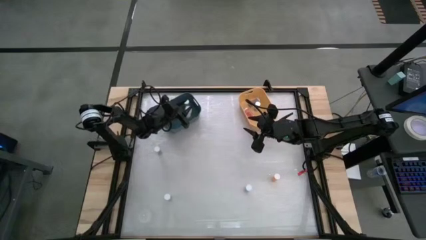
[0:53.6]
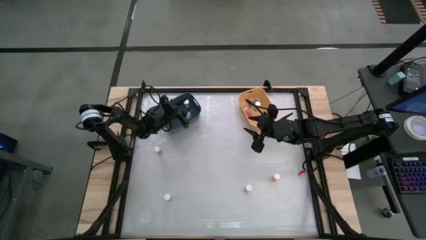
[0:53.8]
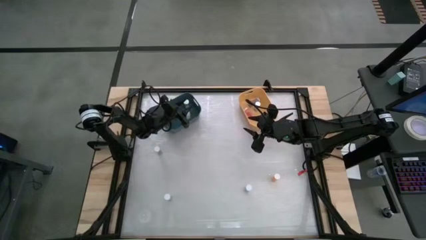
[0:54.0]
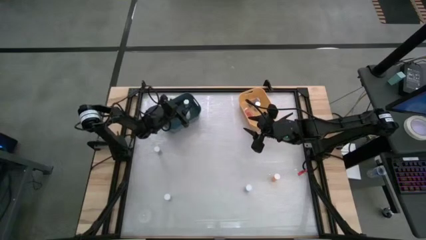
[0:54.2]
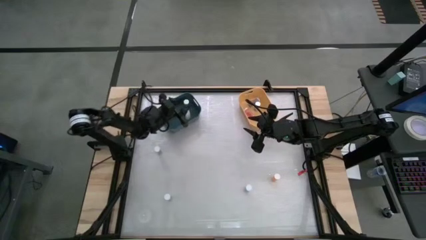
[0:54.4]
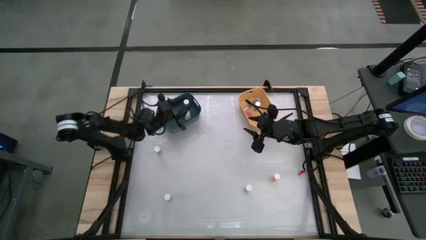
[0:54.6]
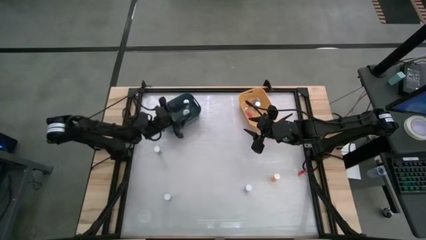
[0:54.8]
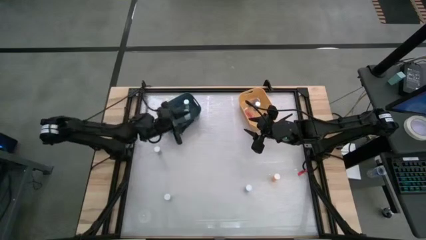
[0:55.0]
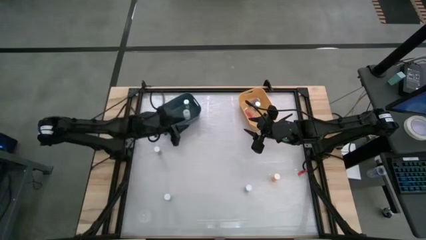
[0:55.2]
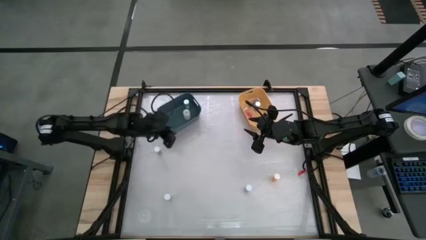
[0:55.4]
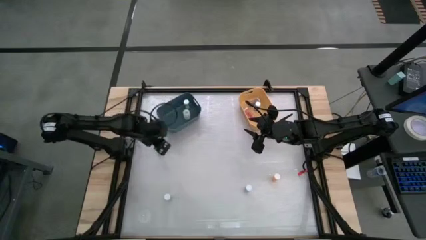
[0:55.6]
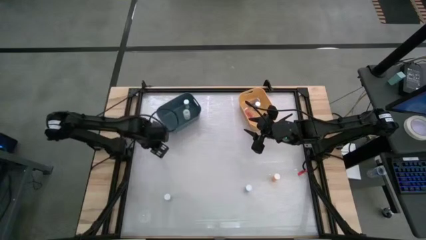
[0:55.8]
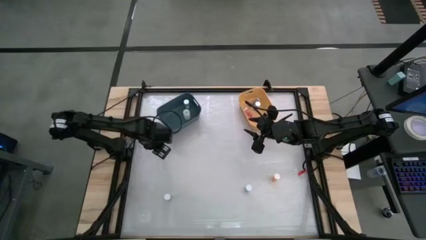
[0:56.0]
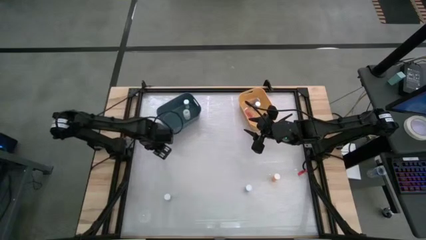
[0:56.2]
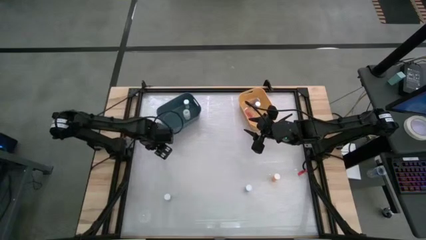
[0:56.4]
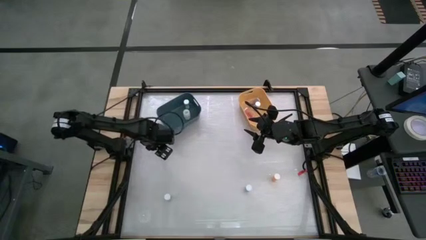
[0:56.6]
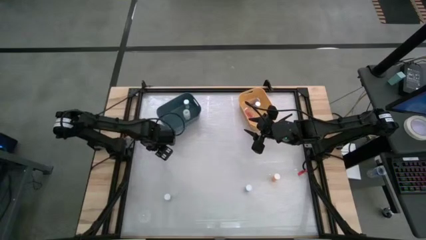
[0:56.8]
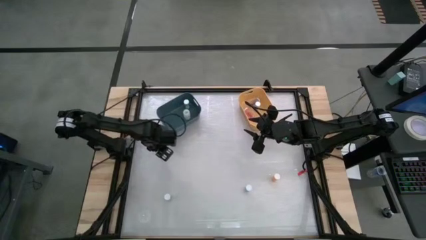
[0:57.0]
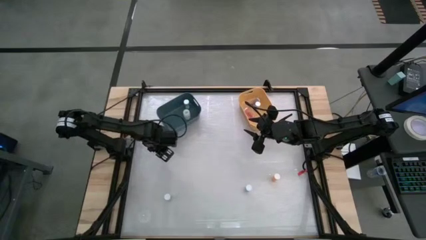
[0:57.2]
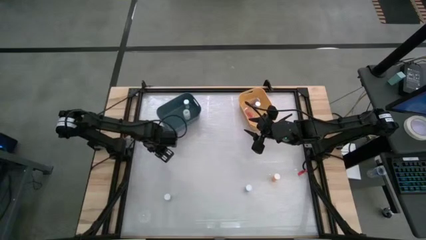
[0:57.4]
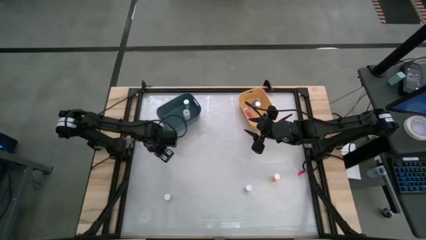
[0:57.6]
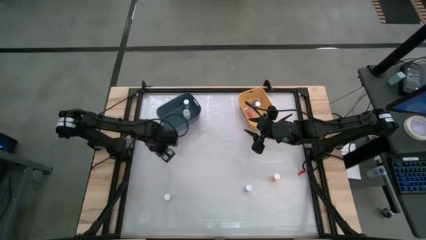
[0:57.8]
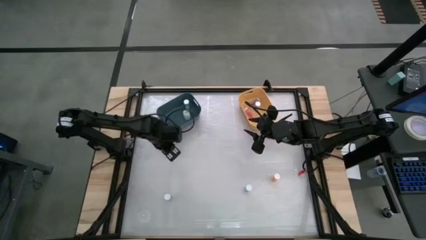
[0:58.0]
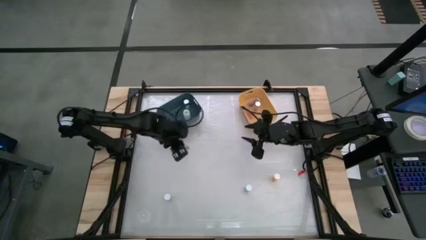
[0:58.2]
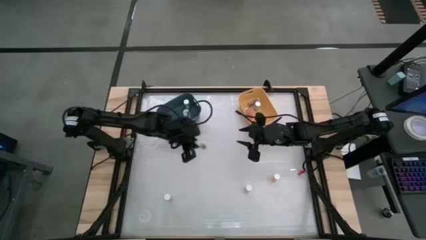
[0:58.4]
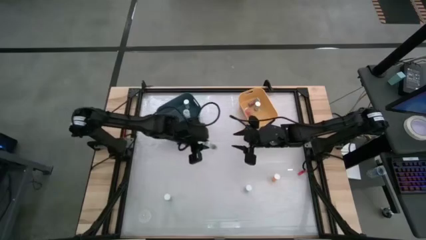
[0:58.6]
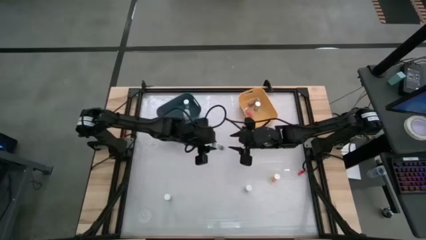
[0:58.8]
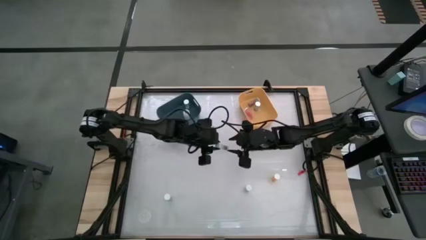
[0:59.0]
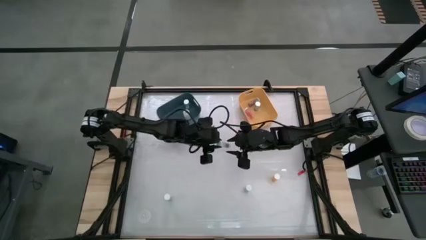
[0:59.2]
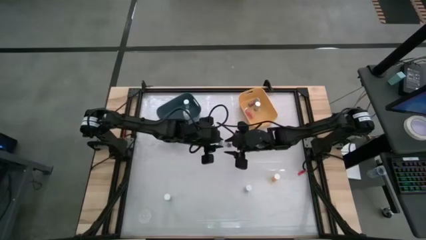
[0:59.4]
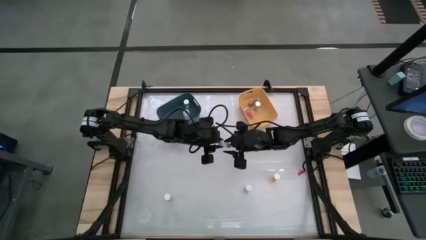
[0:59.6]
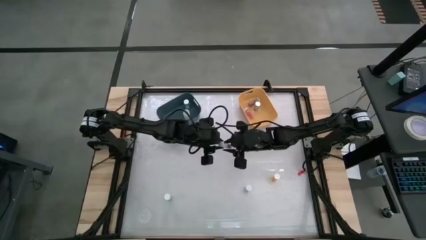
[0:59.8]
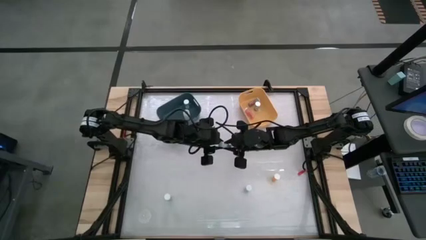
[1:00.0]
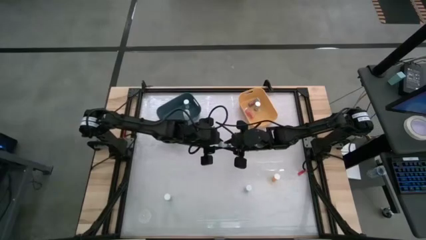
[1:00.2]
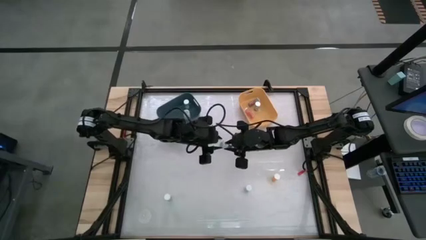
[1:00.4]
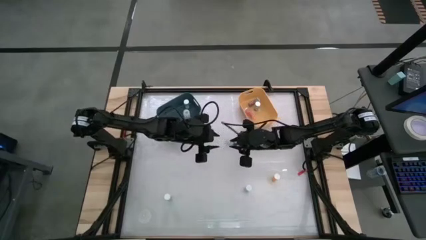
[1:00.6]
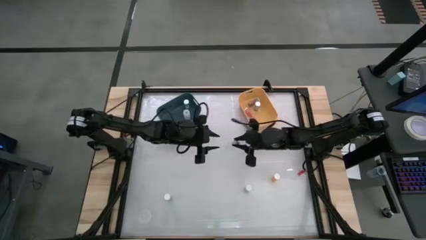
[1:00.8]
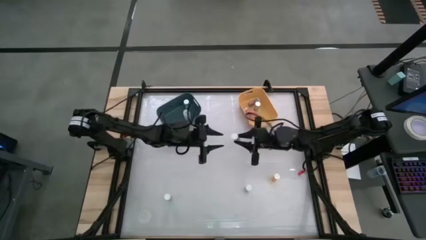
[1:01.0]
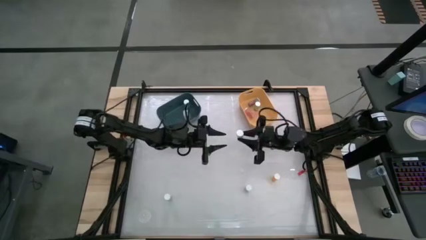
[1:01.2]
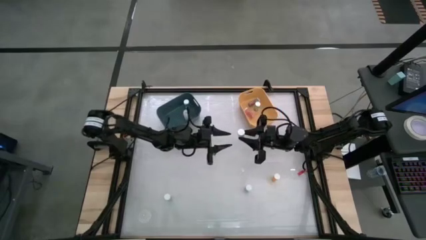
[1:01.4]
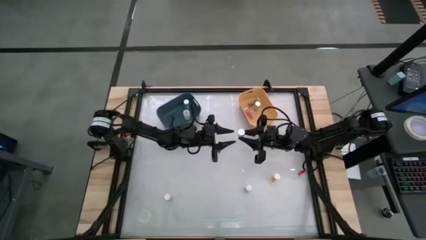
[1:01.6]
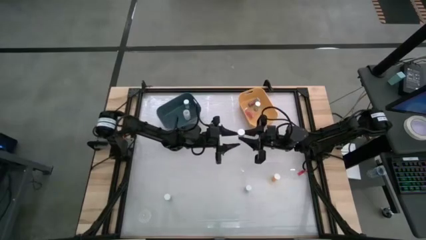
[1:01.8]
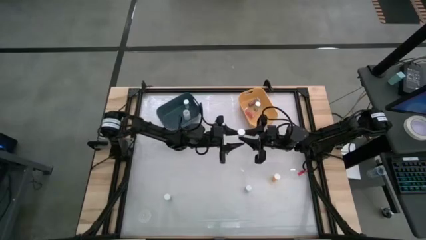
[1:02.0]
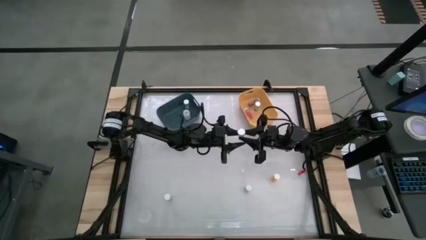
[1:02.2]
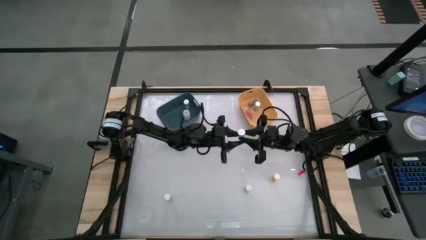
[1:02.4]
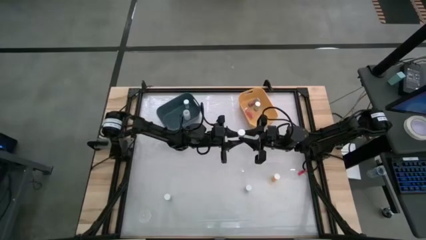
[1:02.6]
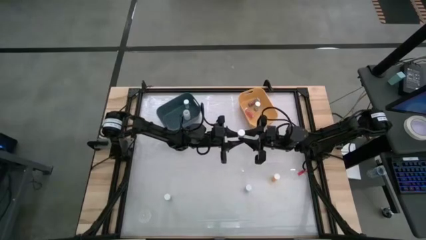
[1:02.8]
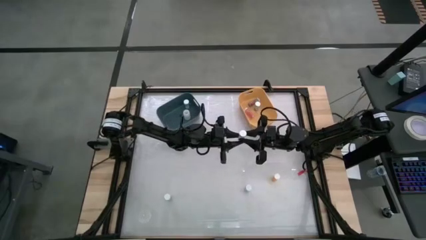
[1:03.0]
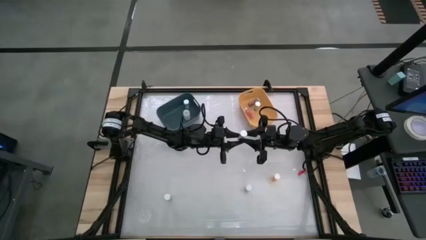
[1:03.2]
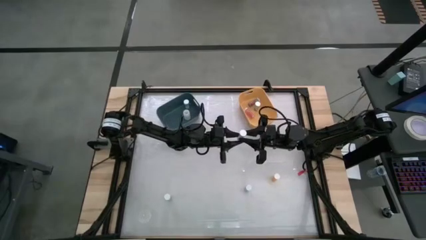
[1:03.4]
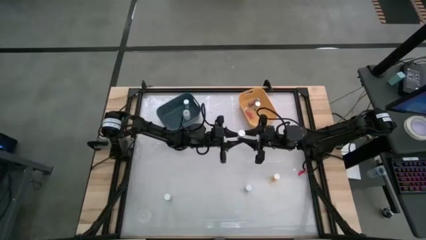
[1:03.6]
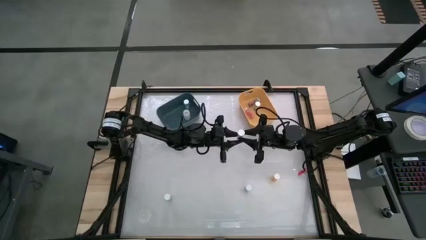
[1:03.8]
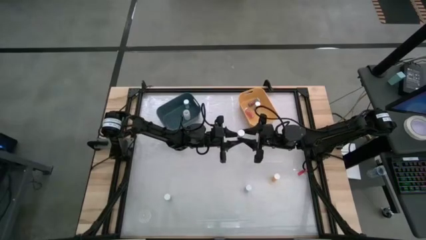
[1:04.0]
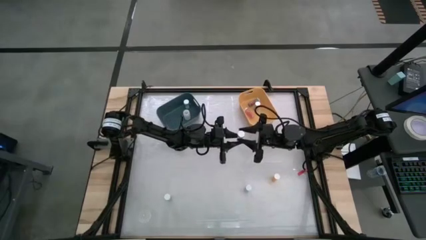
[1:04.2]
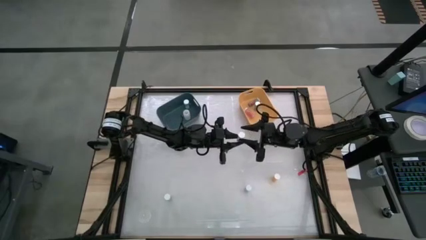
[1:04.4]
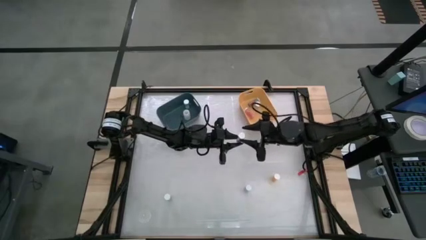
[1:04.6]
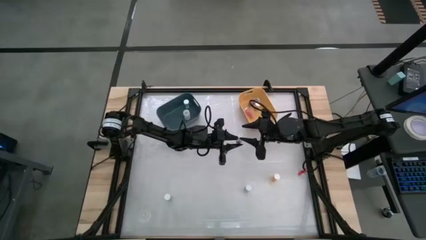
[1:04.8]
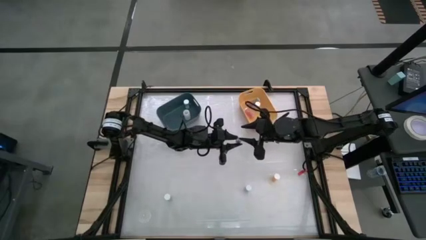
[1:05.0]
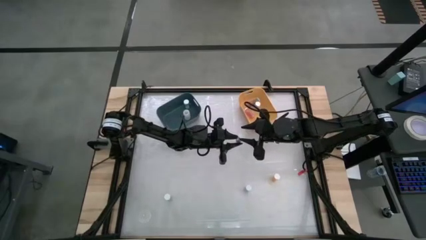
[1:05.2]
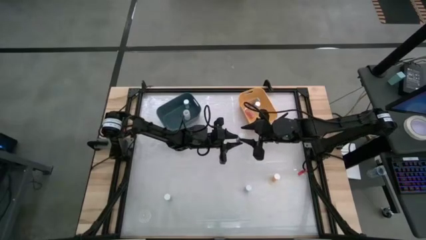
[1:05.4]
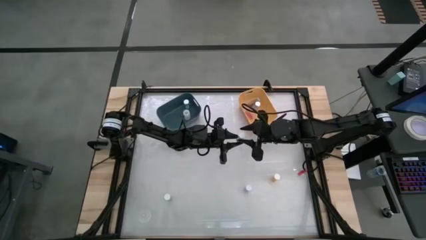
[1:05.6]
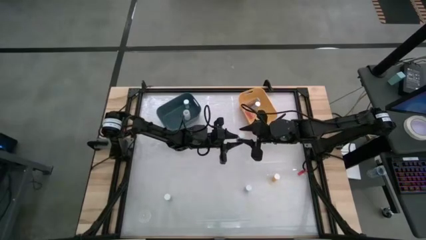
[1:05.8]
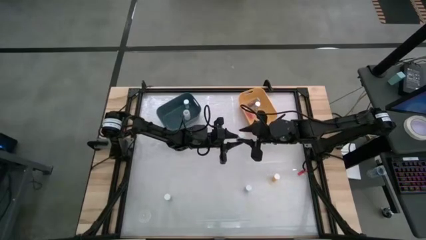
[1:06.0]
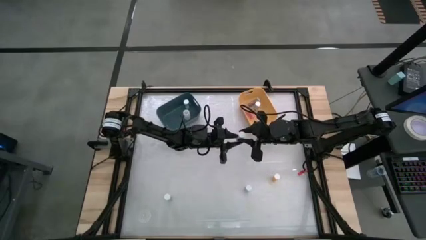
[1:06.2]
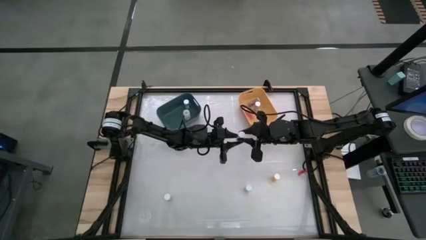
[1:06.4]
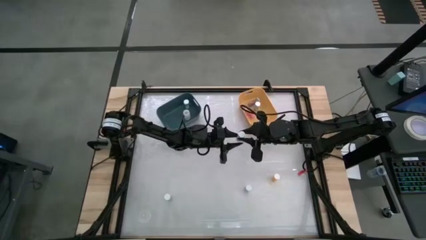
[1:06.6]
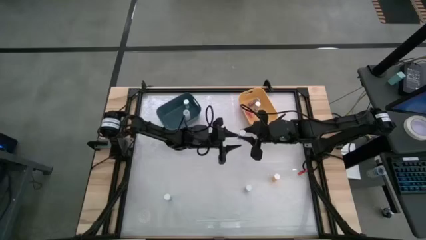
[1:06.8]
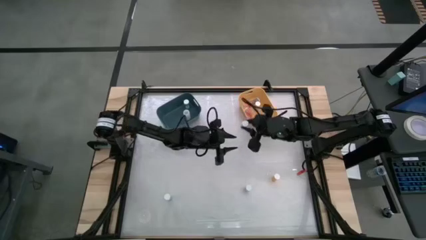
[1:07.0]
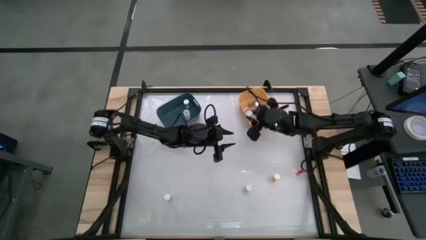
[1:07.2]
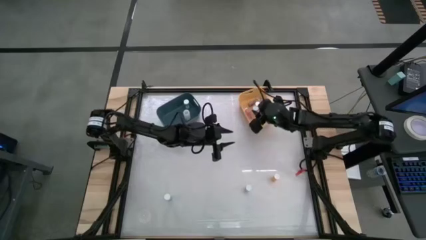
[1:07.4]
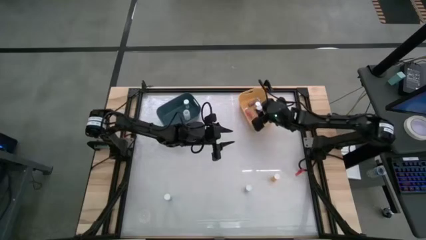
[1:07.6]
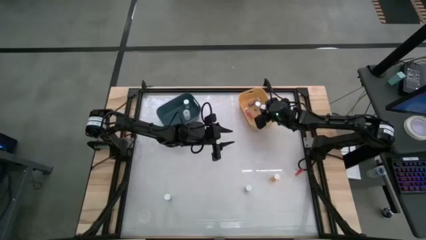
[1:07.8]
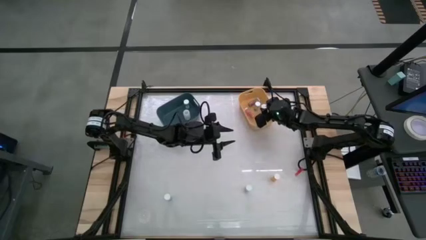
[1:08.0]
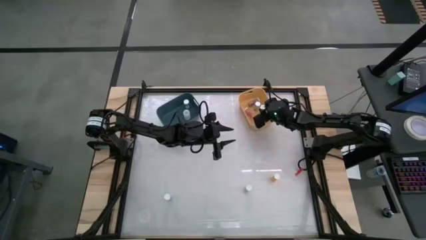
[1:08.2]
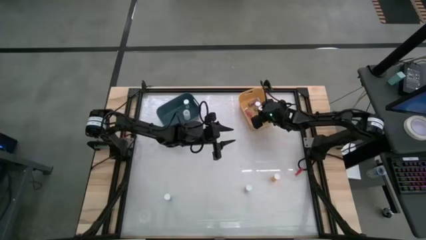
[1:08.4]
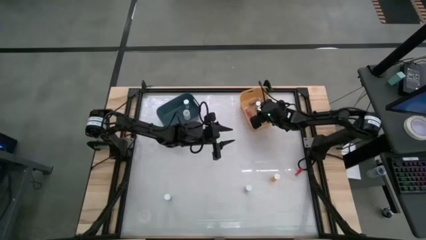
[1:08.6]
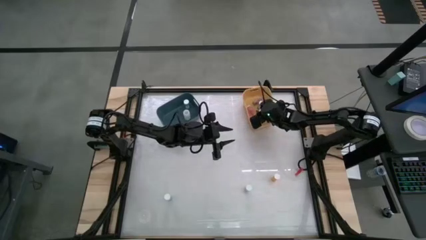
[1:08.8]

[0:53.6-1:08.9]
Task: Pick and place medicine bottles into bin by pill shape (circle, oval)
Put the blue capsule bottle into the yellow bin

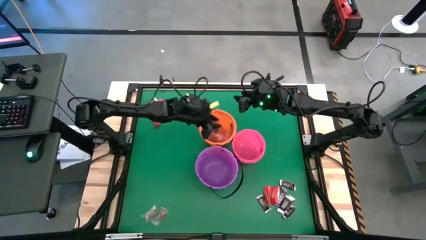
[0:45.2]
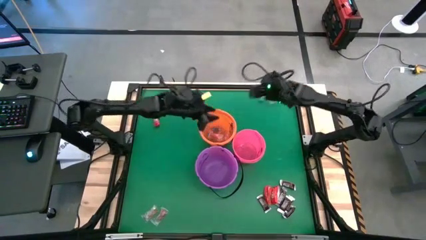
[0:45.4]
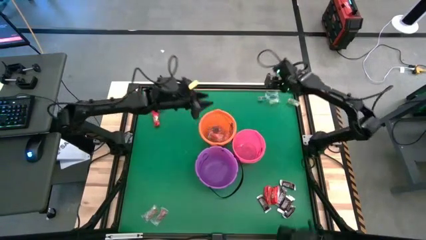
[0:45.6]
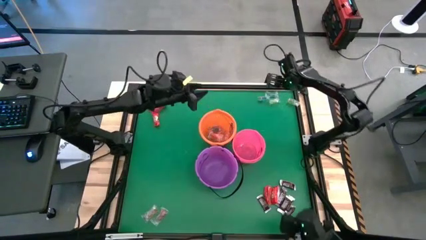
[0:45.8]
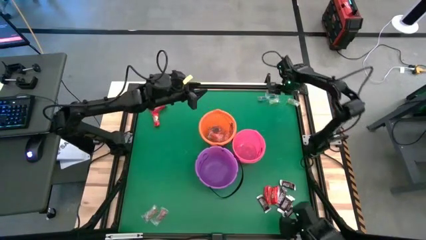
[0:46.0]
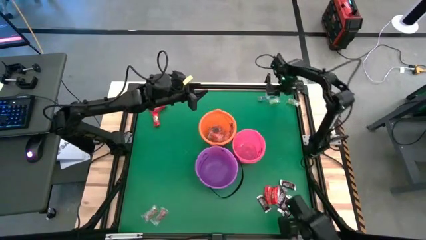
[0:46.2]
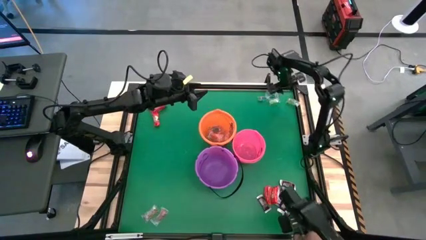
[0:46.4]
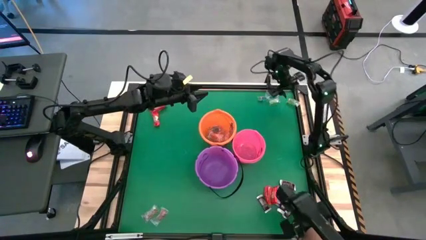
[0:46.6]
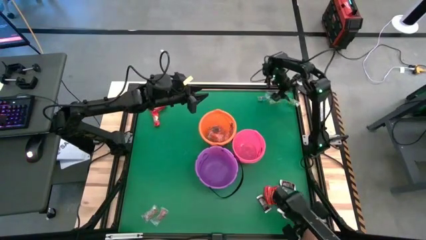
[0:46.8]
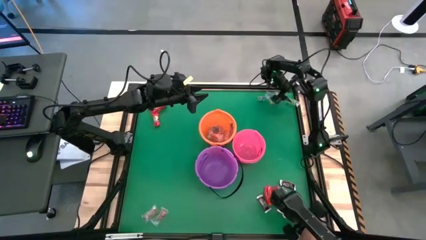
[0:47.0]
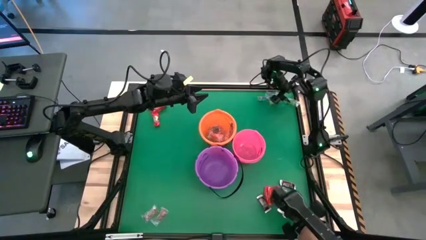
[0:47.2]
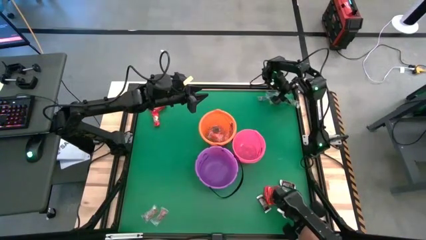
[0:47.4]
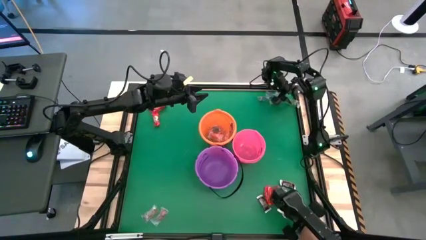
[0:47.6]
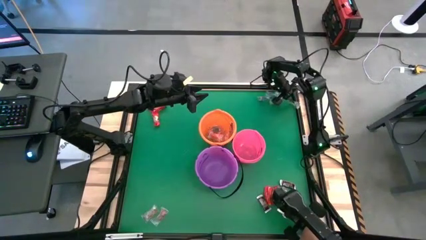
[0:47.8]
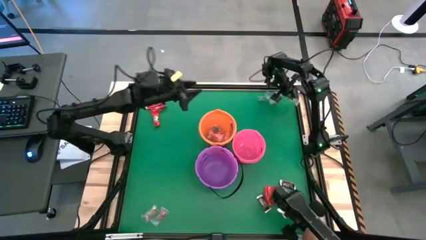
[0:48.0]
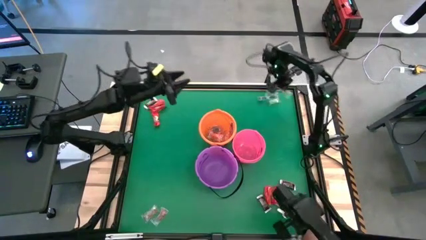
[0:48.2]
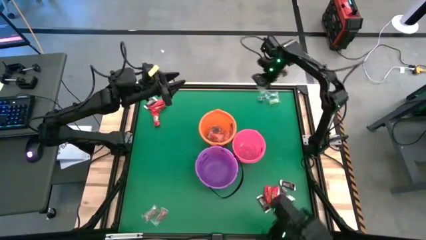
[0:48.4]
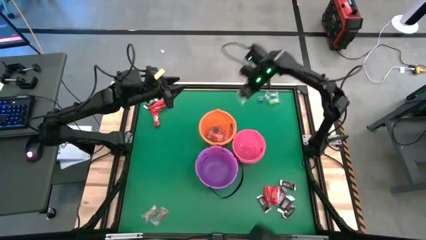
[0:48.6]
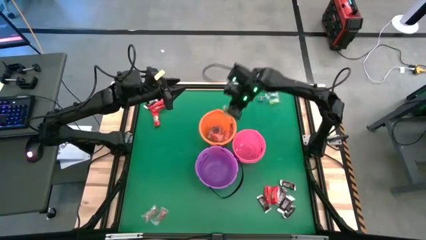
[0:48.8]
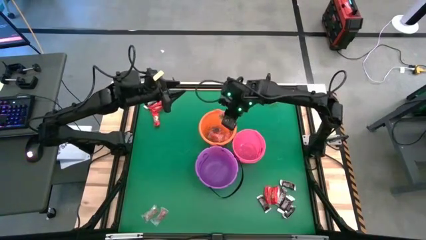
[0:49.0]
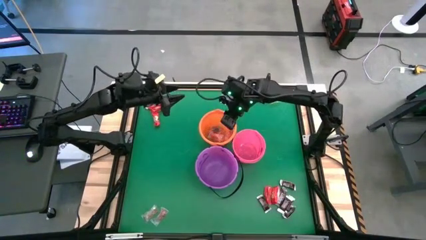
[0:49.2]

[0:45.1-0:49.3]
Task: Sort candy by brand, put in halloween buckets
Put the green gummy into the orange bucket
